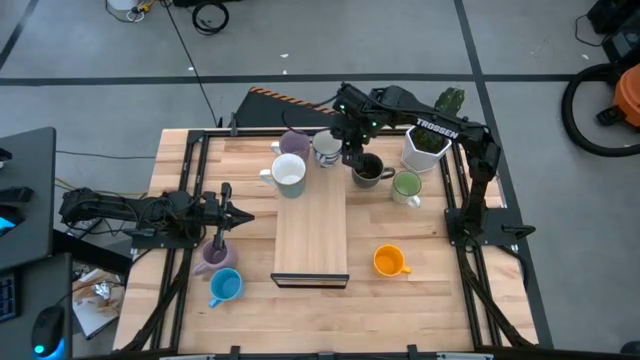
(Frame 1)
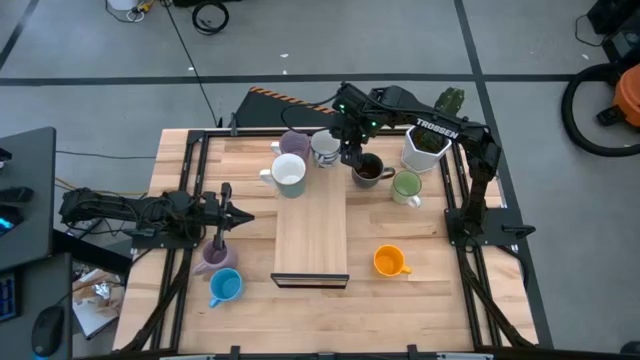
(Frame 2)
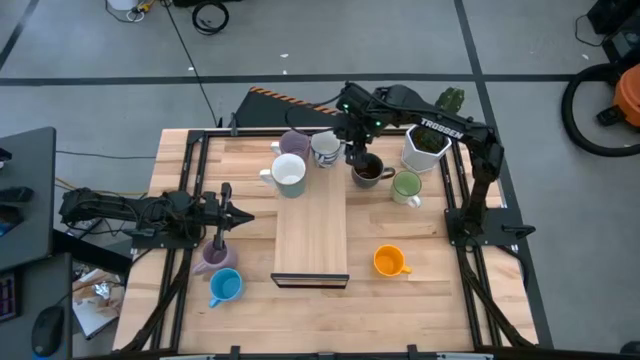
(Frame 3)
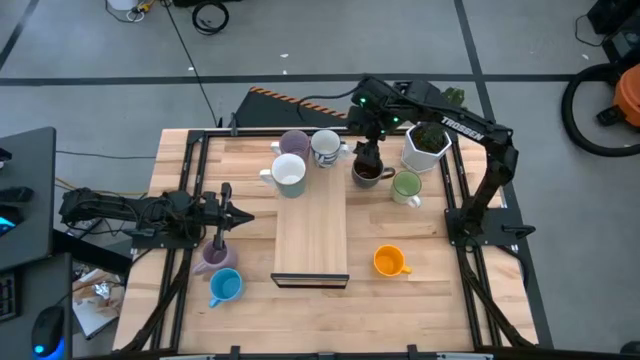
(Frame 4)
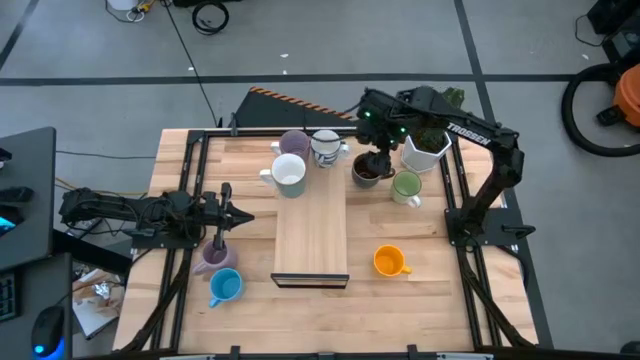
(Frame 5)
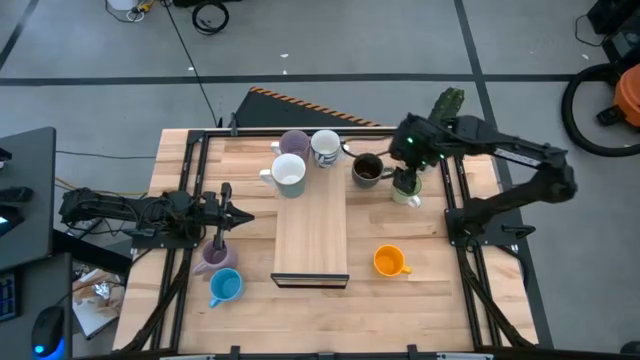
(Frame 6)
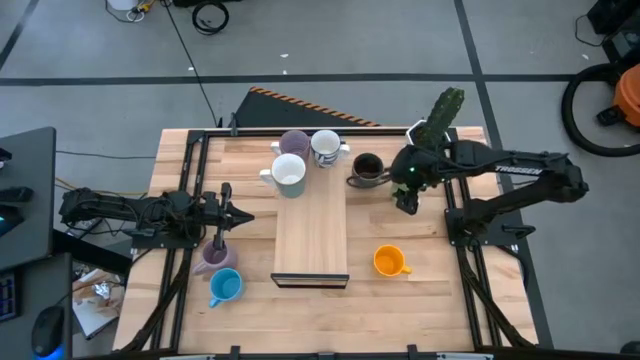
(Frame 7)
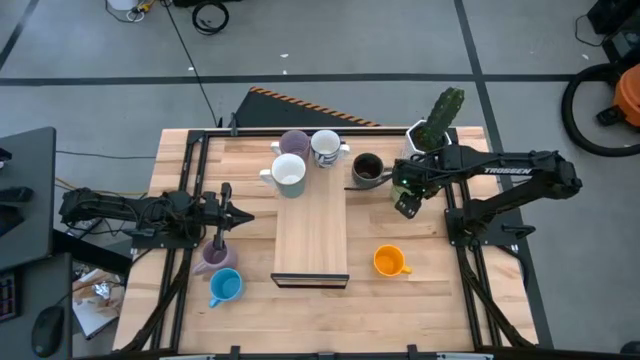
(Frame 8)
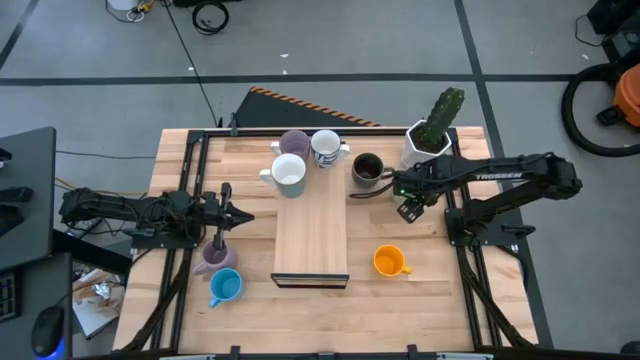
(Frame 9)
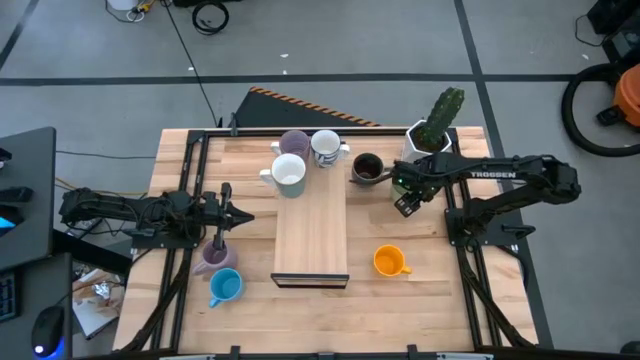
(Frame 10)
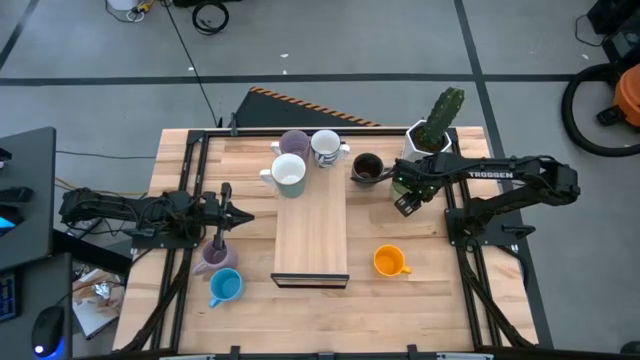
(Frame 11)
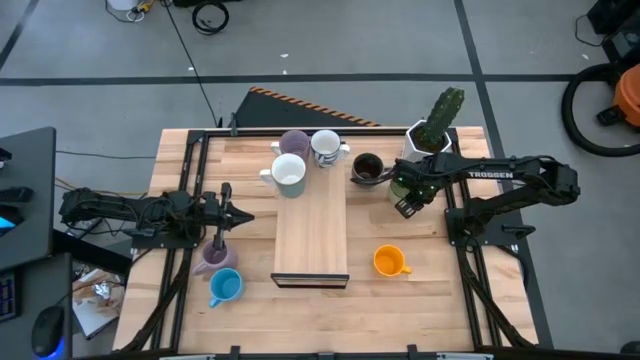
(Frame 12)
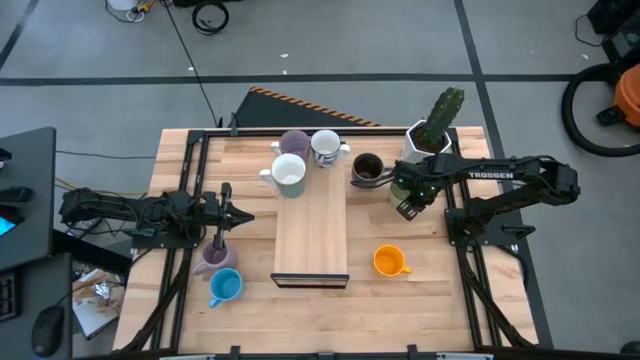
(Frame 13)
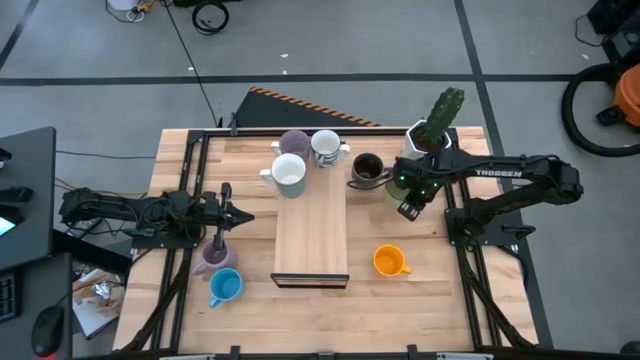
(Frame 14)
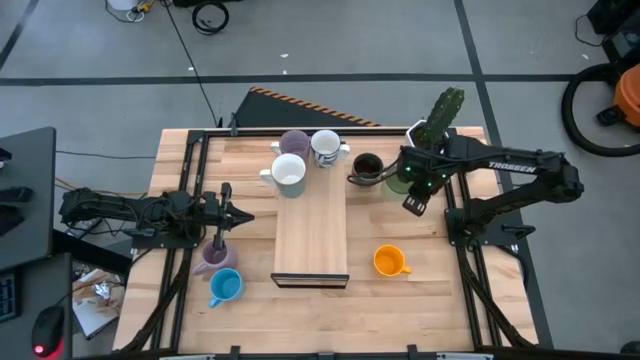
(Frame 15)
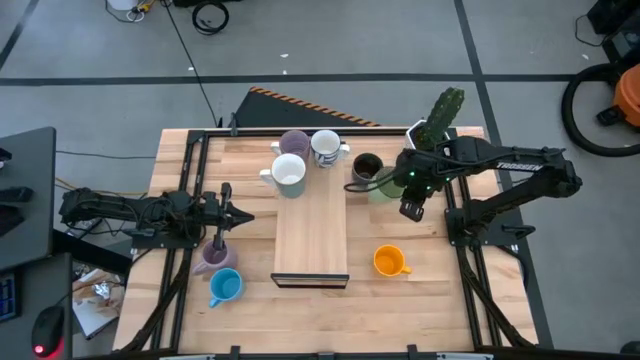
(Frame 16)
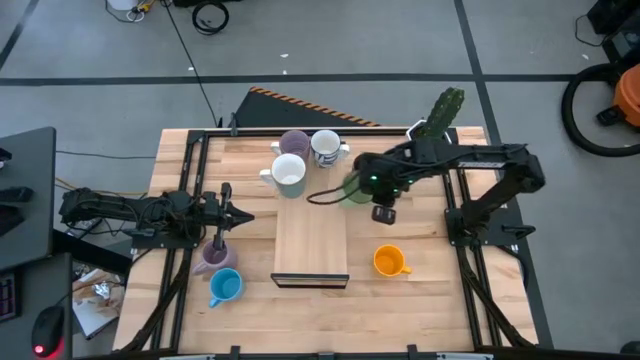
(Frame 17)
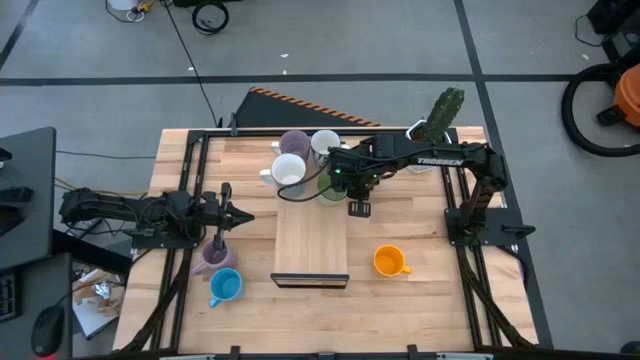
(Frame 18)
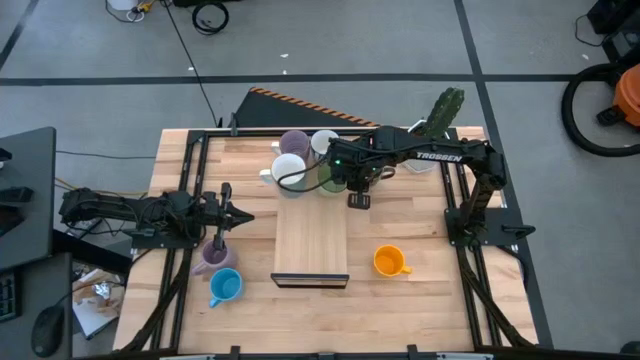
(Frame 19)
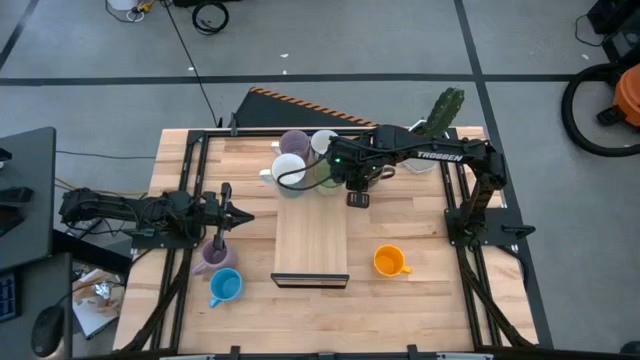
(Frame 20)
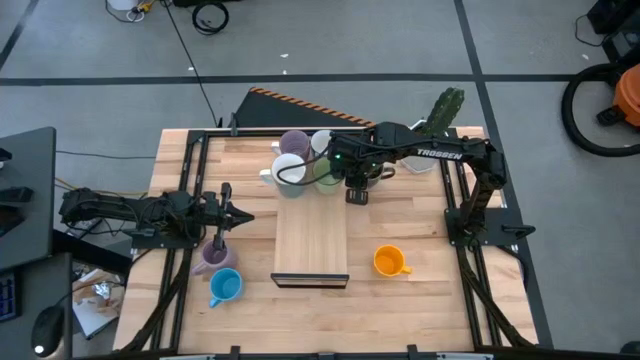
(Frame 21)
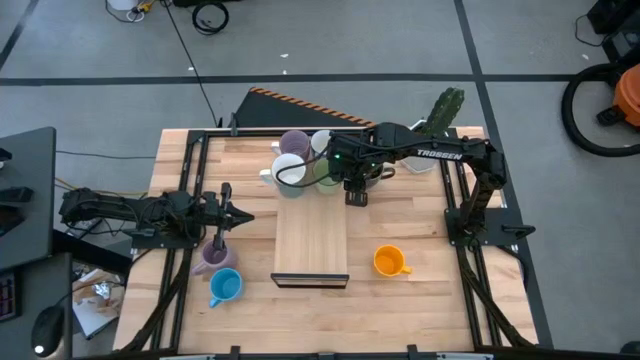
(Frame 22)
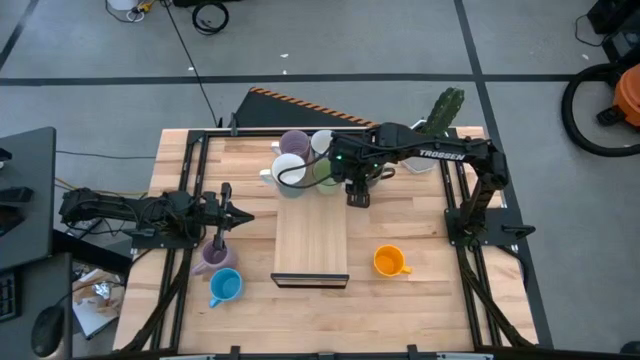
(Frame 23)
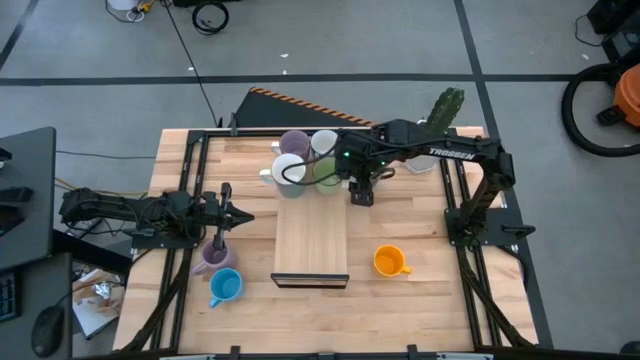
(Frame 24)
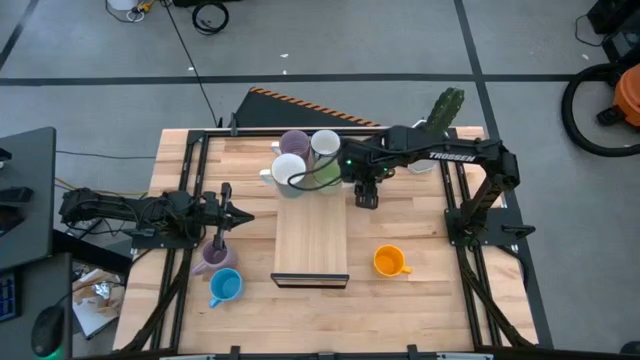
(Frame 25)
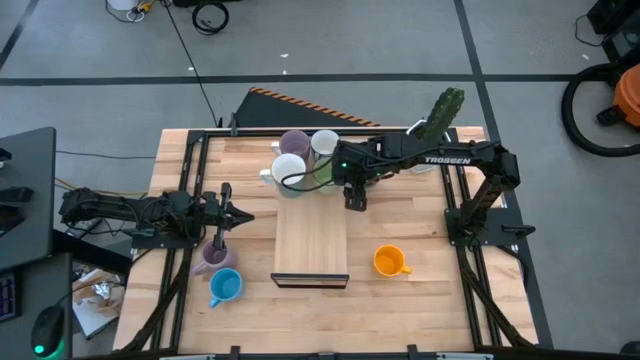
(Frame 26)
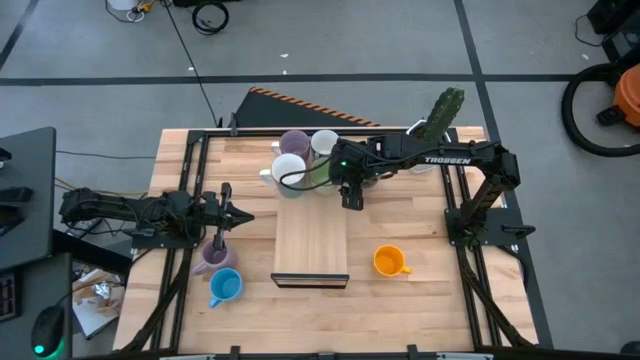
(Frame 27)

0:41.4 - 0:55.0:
Task: Place coffee mugs
Put the green mug on the shelf

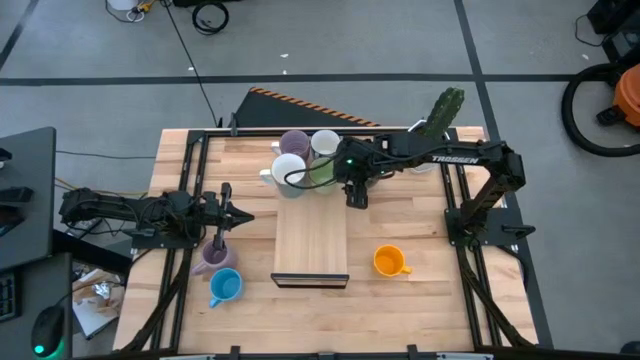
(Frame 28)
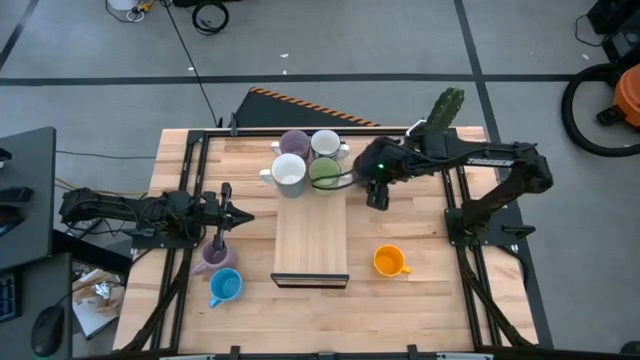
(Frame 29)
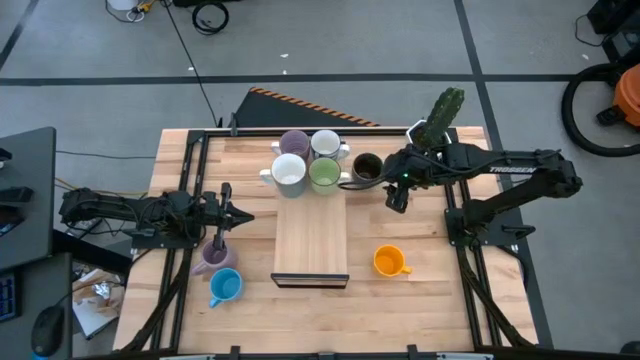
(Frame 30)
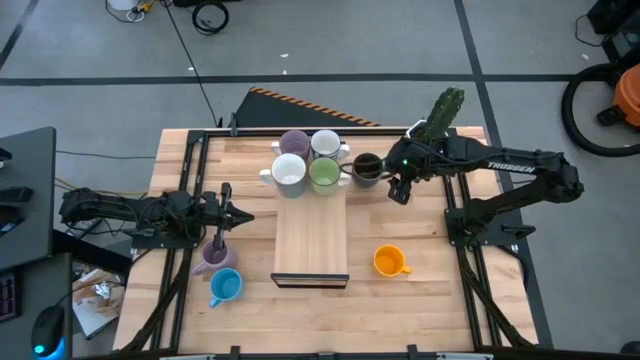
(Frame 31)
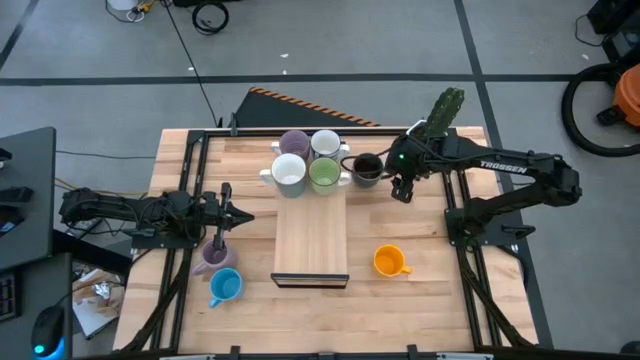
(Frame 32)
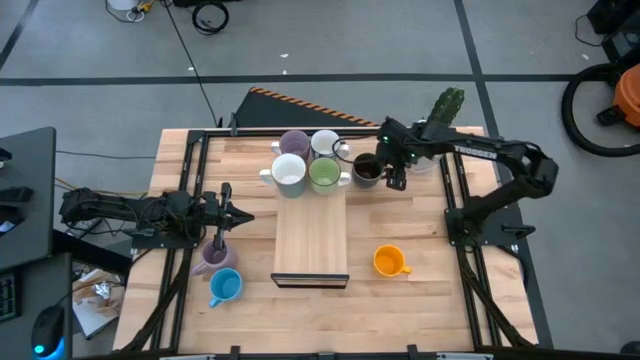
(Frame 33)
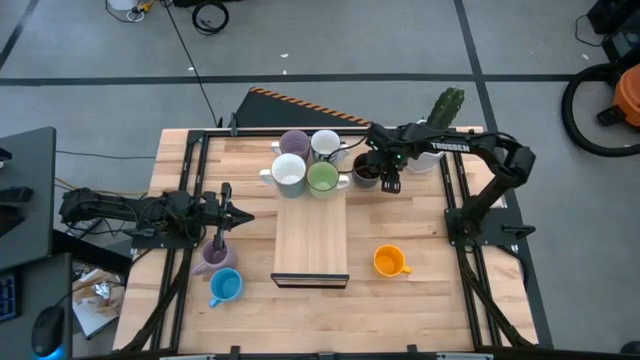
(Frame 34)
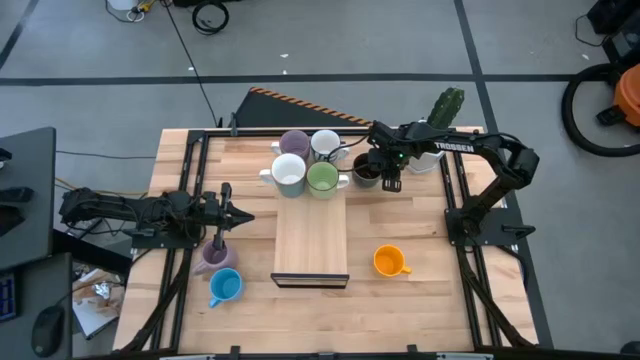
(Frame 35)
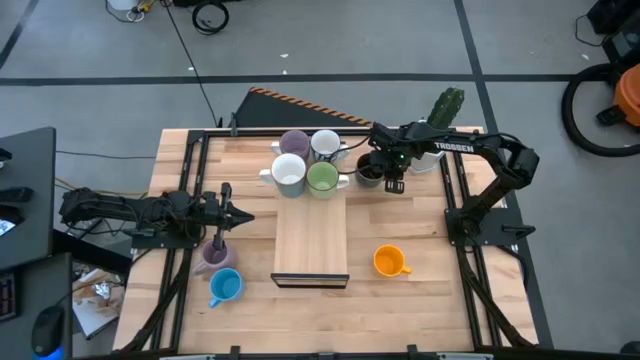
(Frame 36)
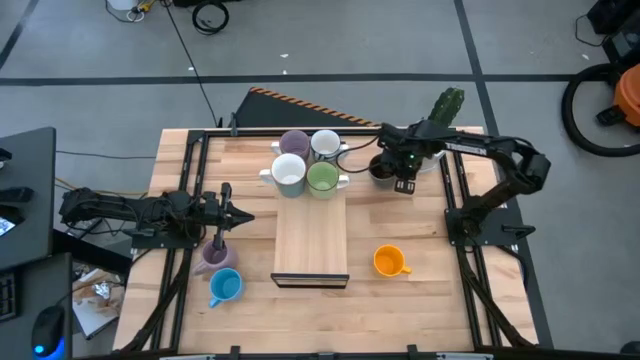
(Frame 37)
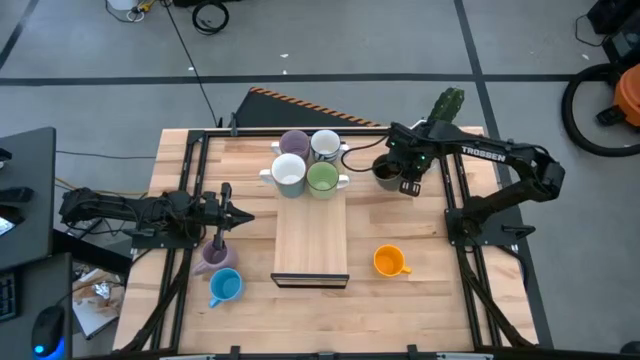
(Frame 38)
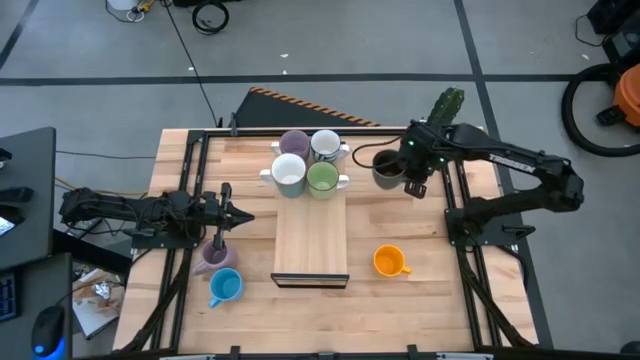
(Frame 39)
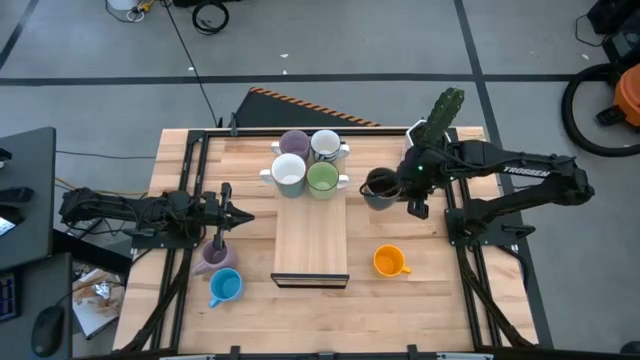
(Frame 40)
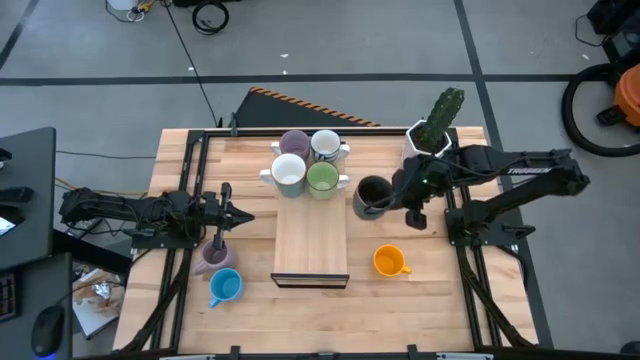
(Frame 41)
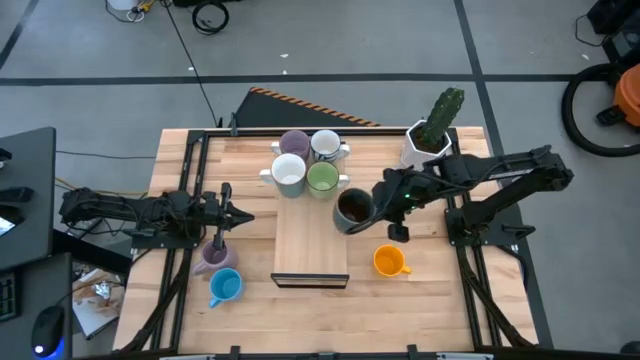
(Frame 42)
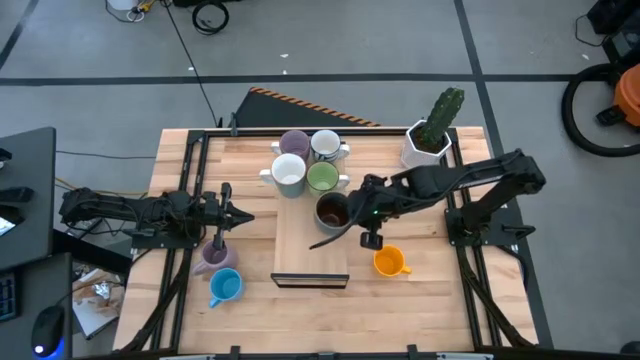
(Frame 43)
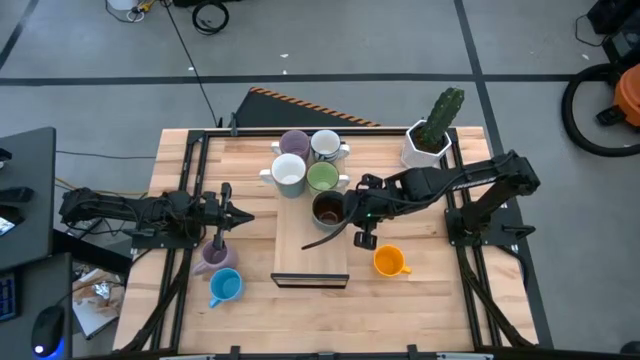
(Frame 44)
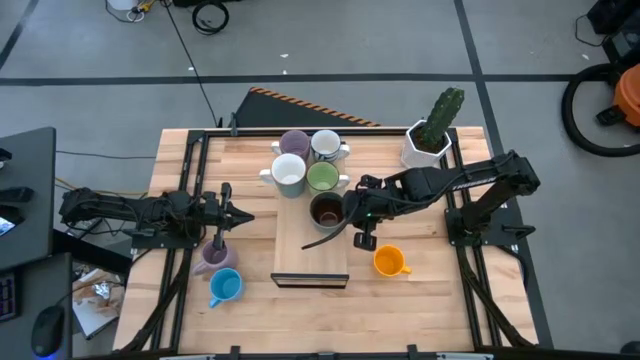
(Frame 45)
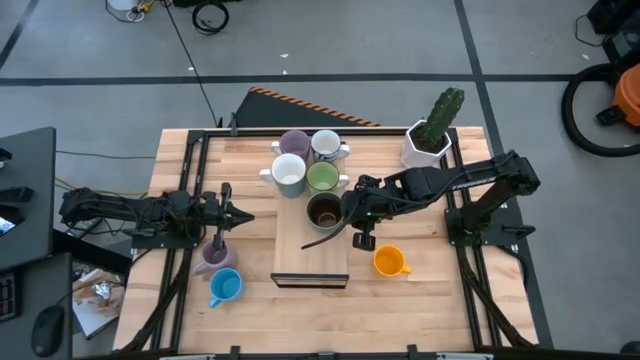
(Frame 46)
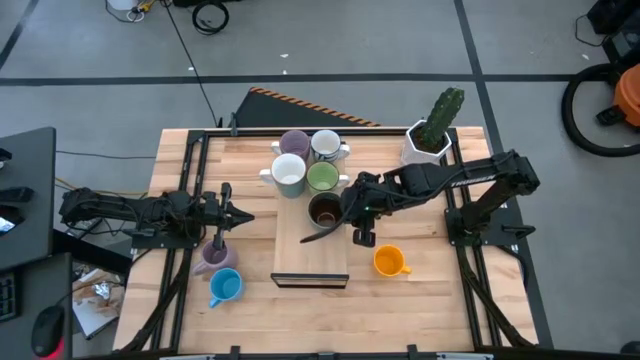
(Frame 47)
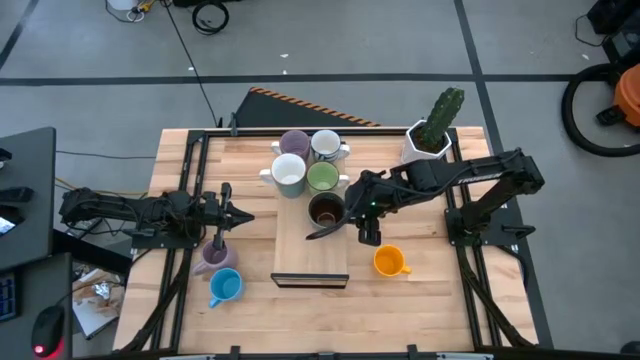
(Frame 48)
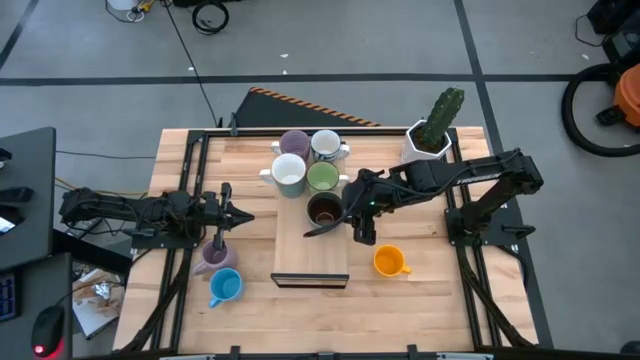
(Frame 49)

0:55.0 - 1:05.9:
Put the brown patterned mug on the shelf
